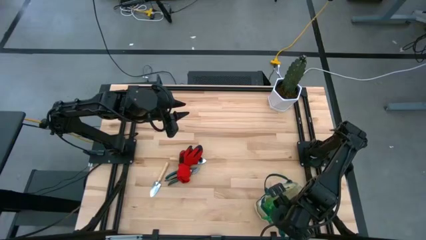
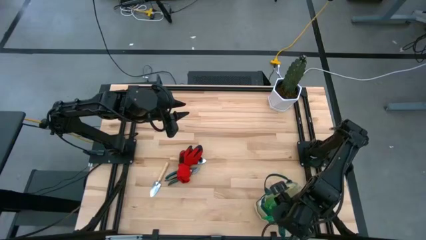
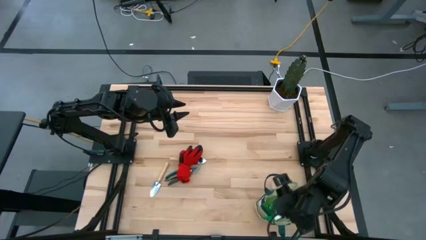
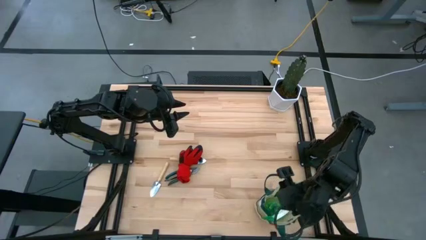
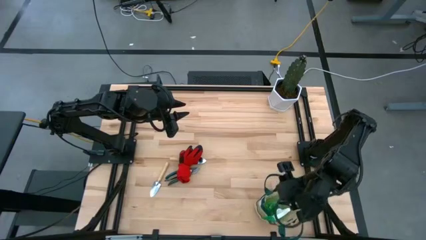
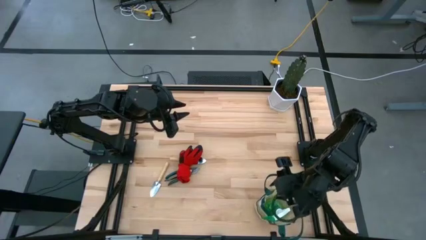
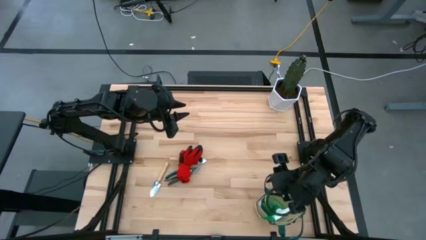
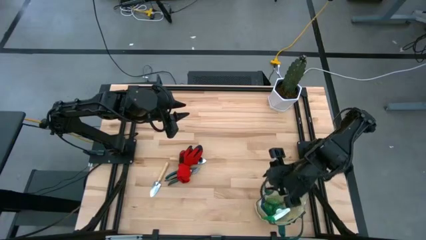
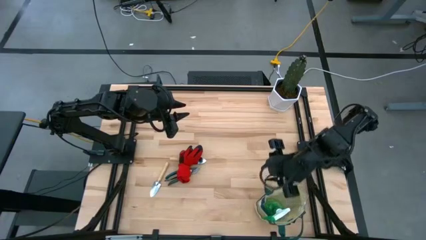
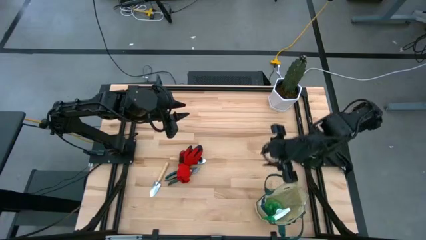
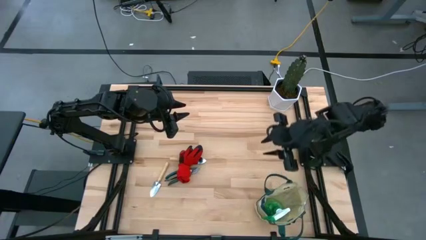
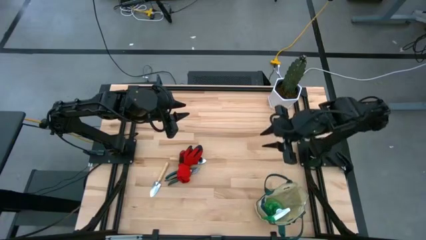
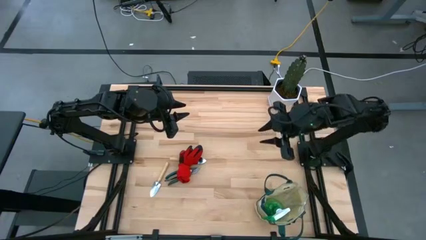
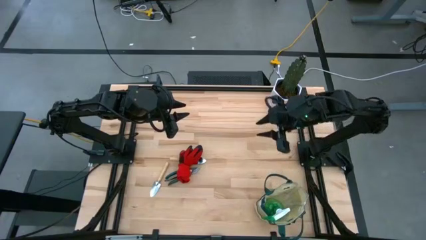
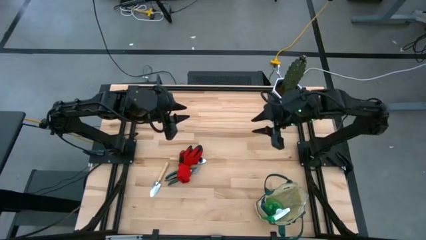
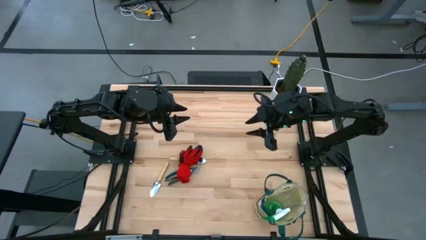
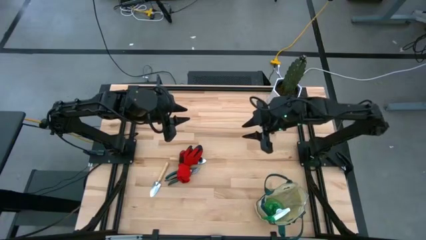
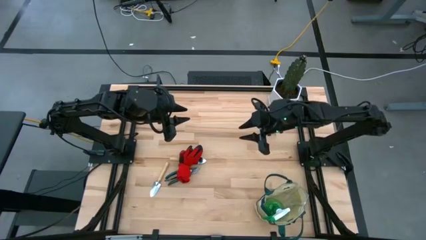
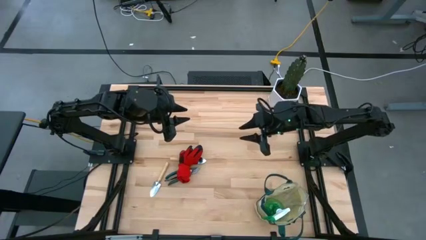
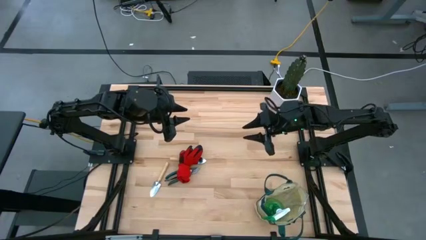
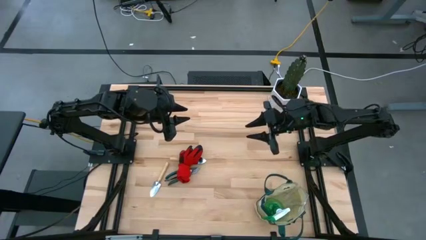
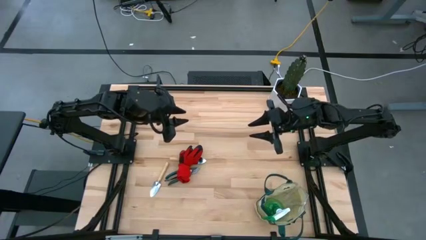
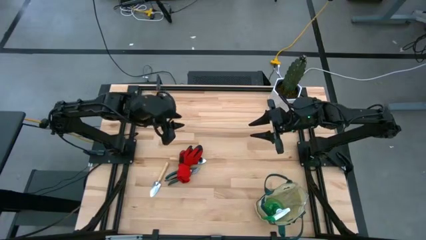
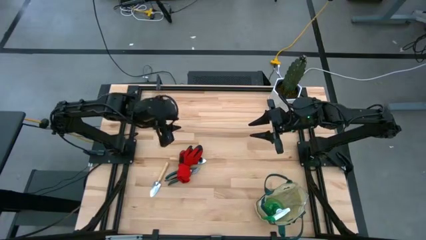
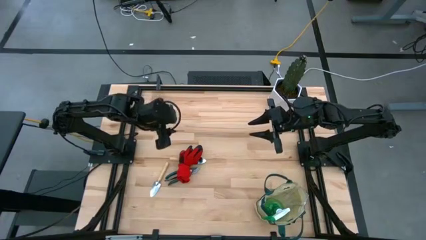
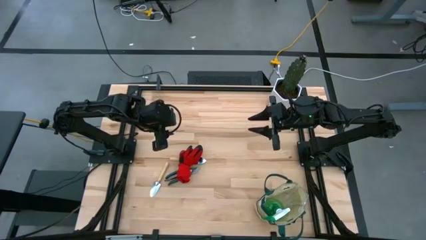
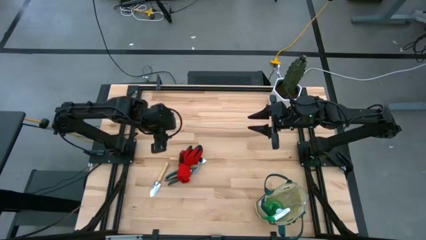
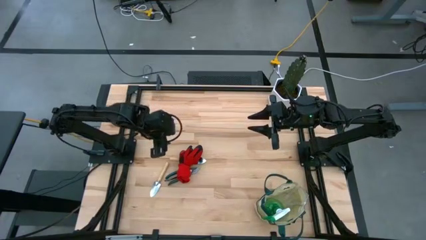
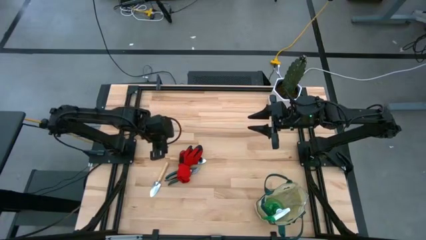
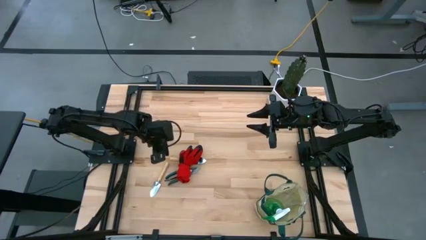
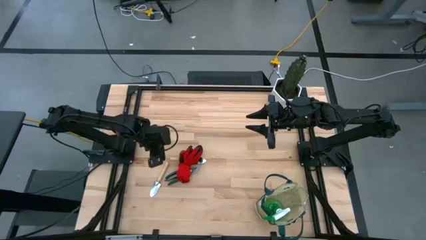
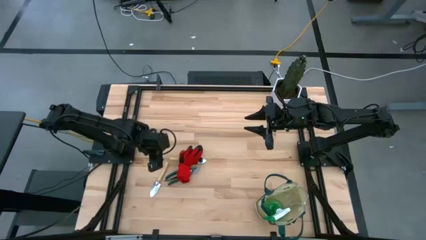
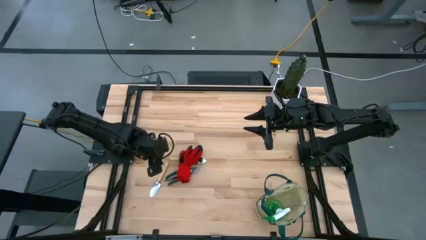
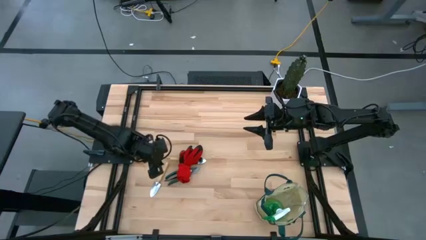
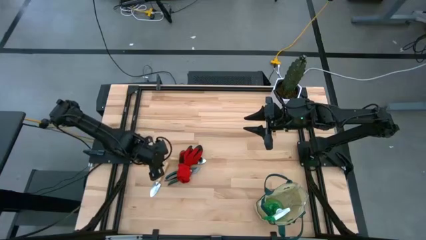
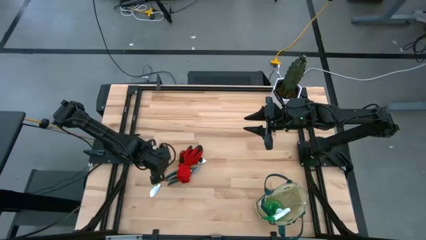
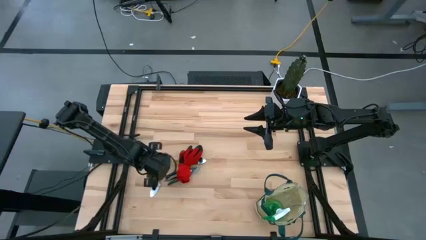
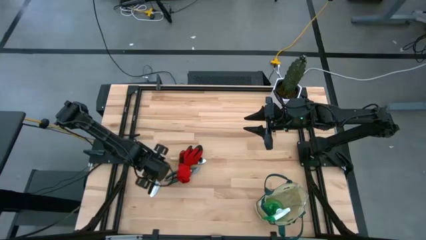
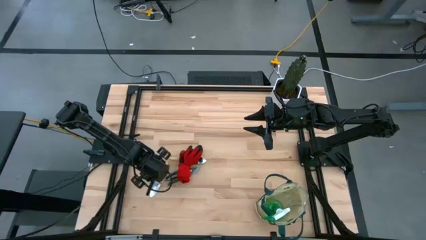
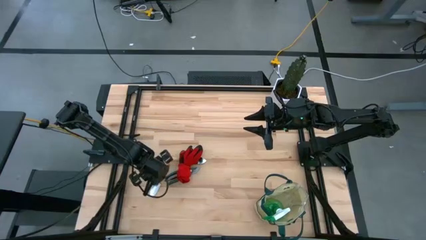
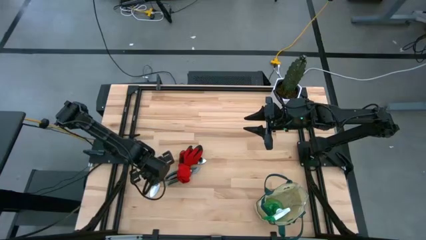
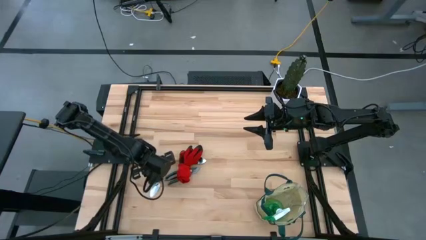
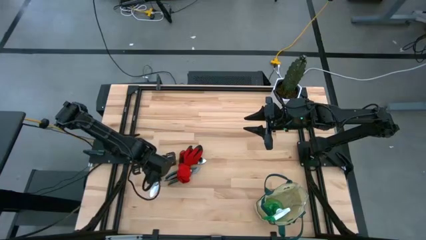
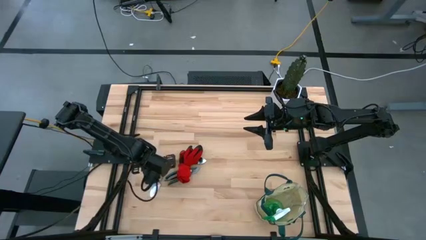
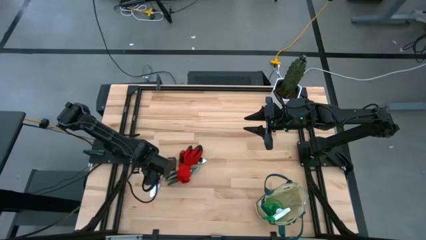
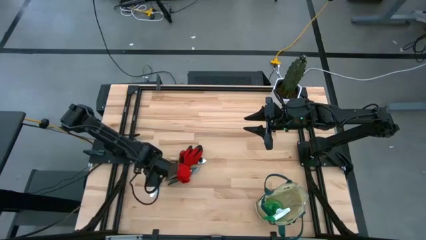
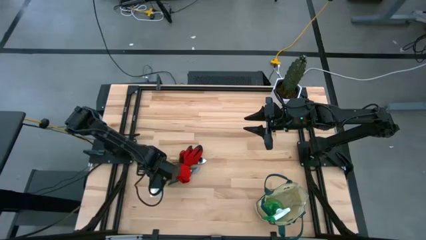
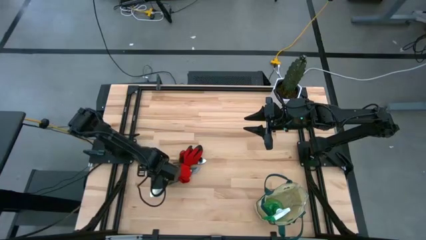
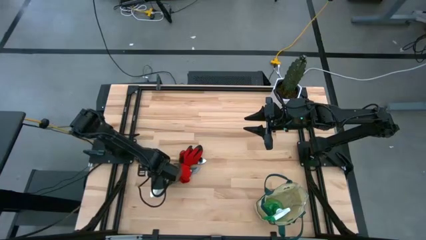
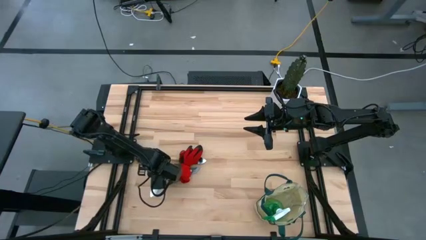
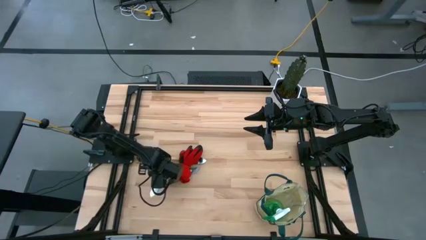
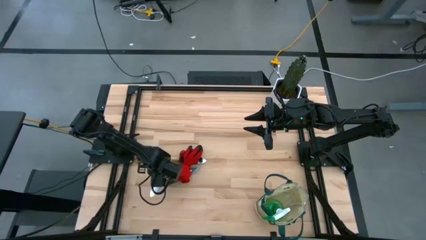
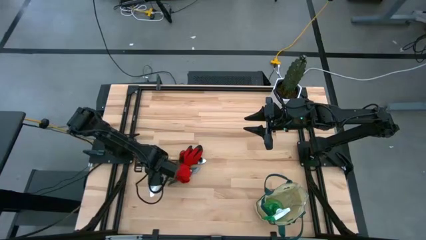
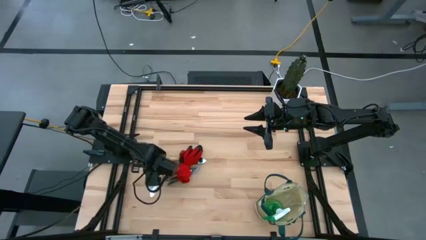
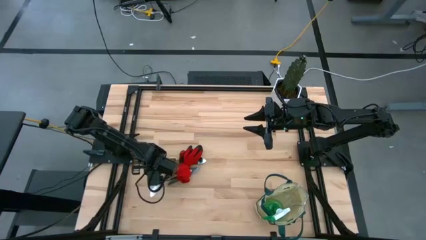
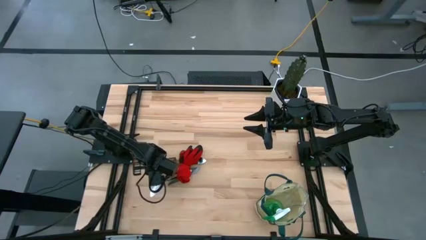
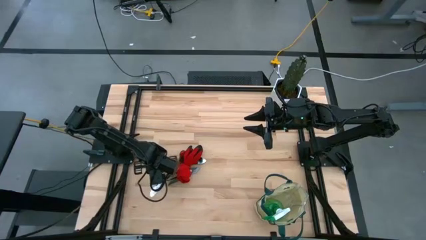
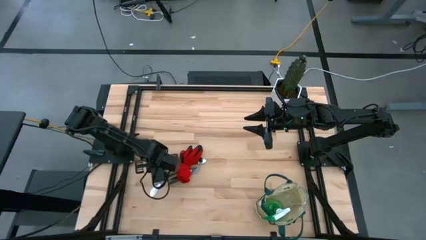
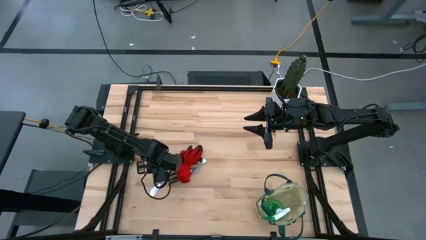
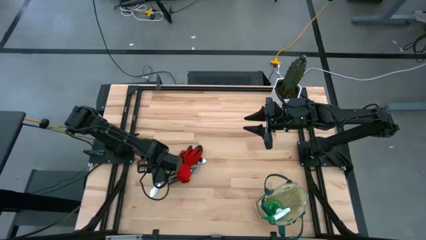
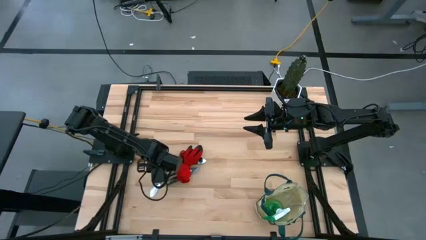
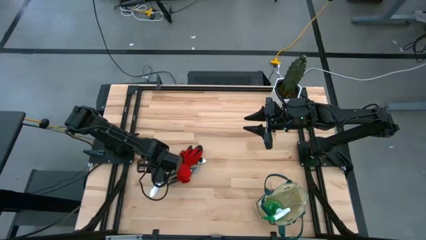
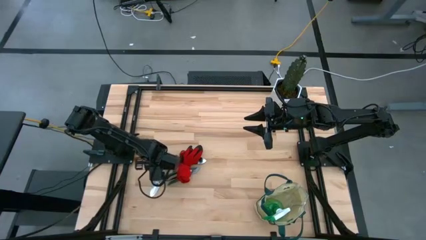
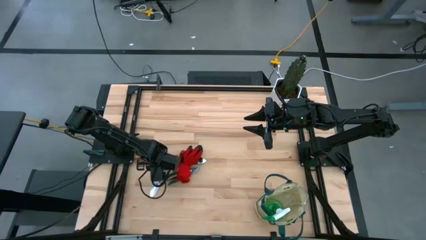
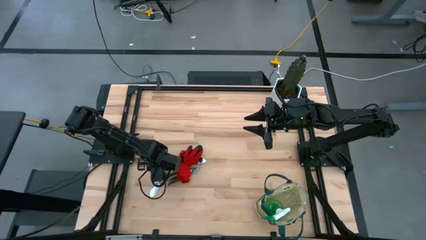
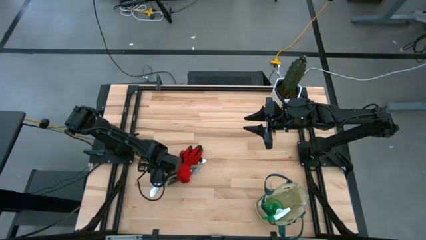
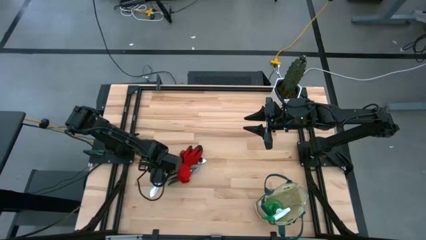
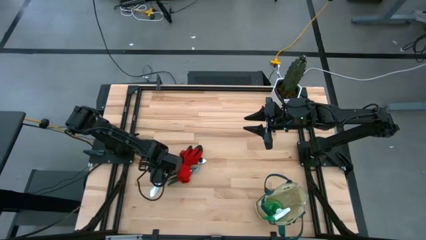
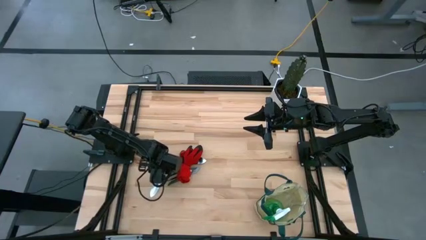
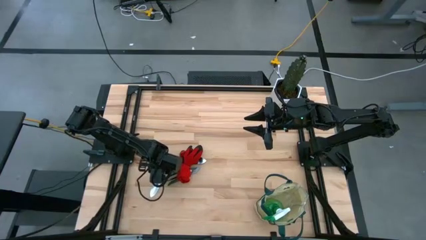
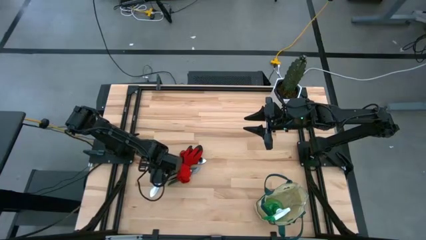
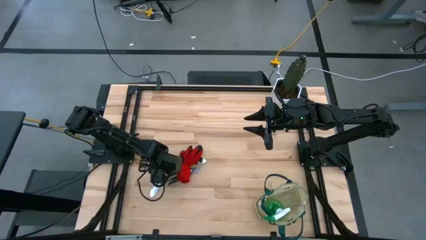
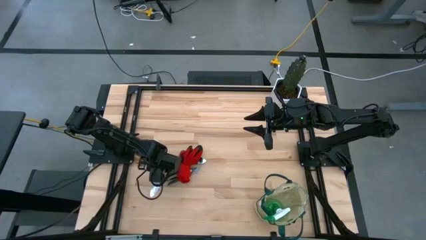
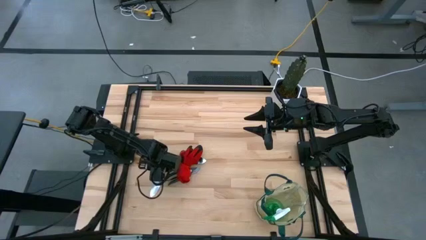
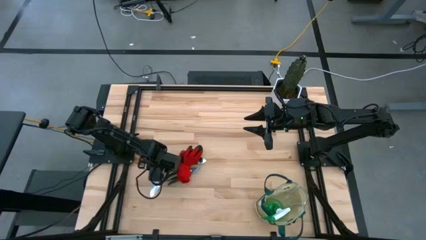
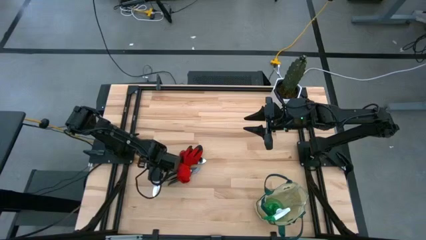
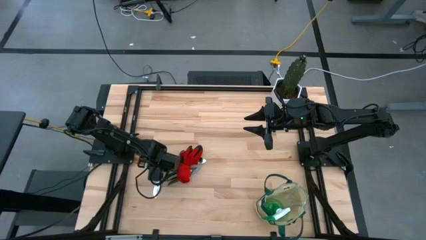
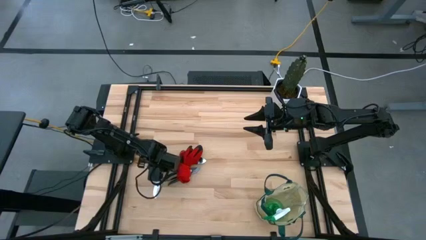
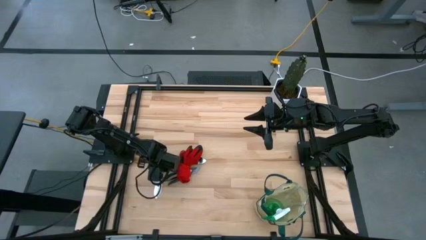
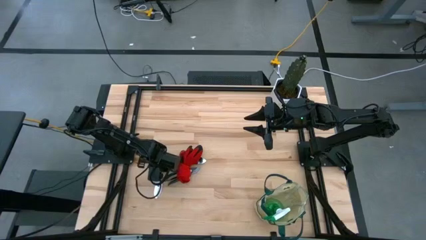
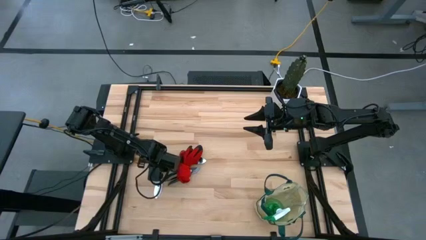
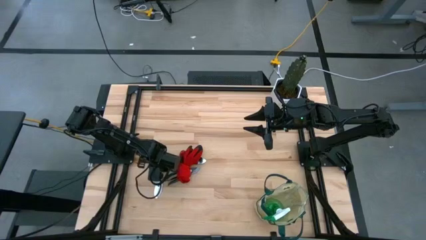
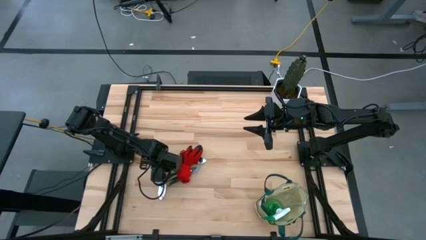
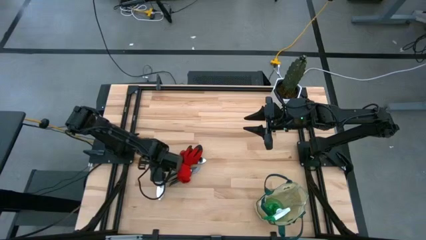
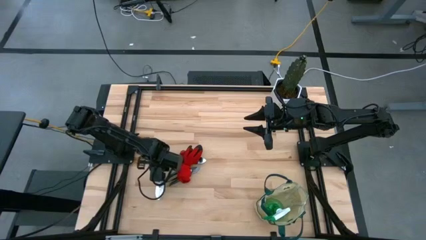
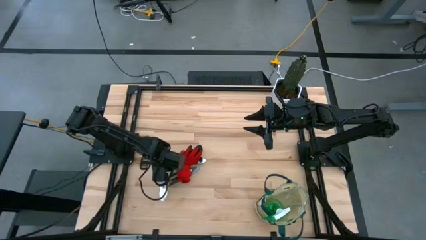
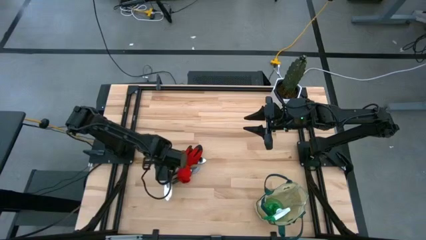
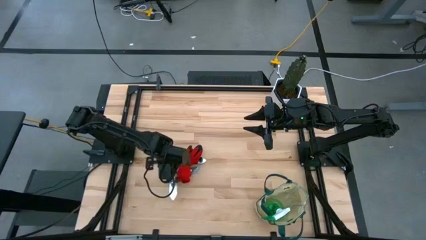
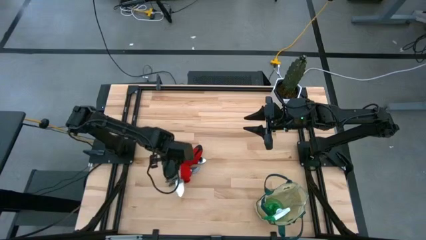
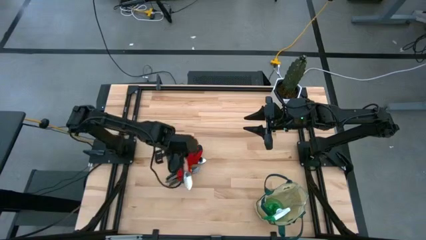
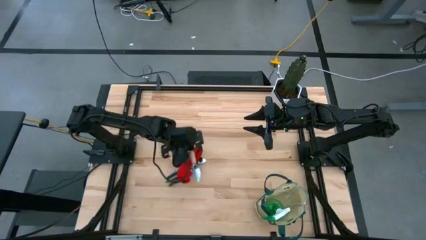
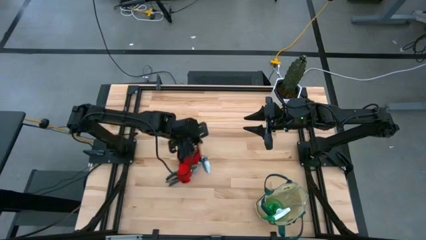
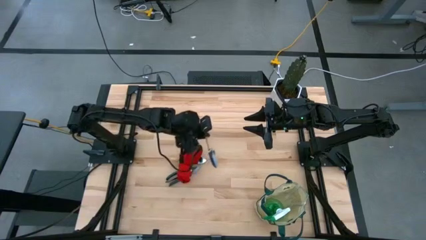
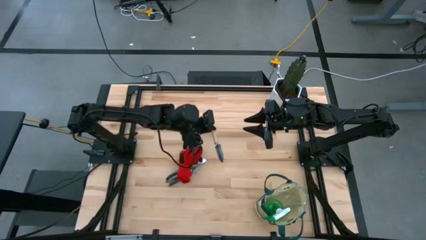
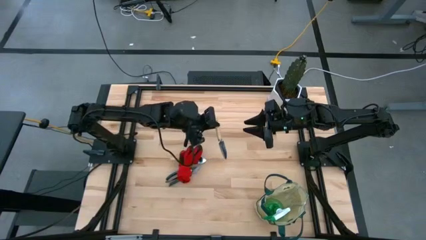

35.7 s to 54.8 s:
Task: Pick & Place Garden tools in Gardening bag
Put the light brown trowel into the gardening tool bag
